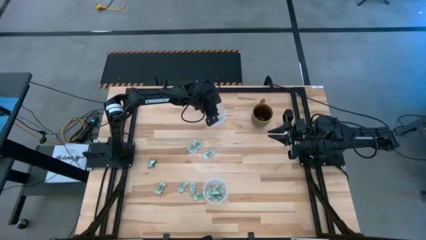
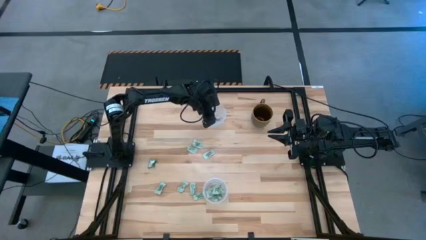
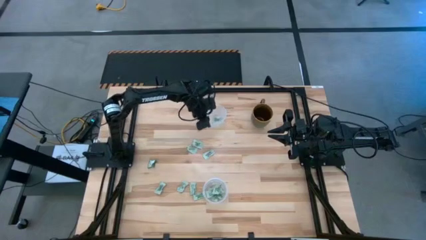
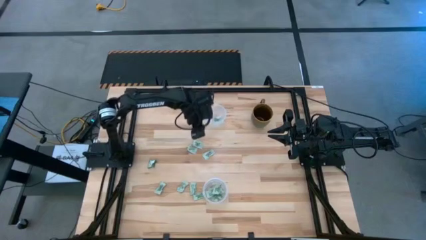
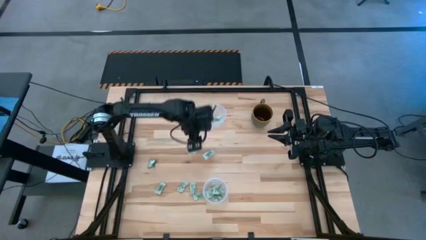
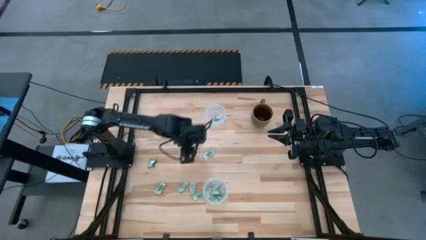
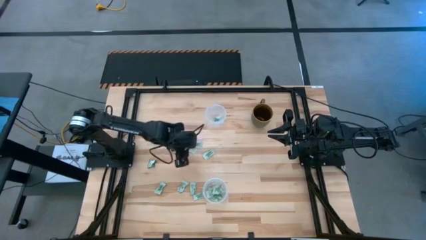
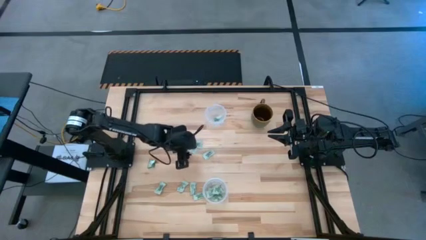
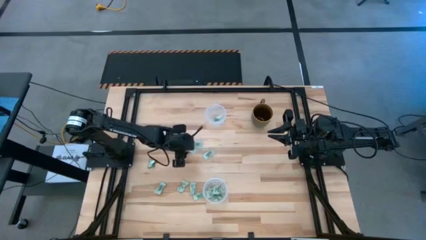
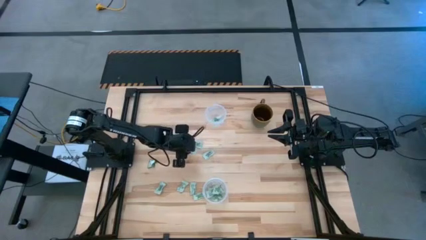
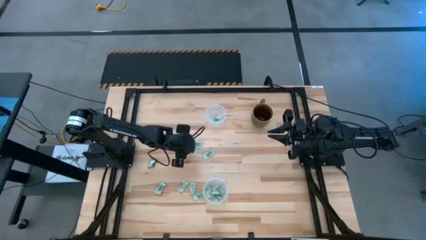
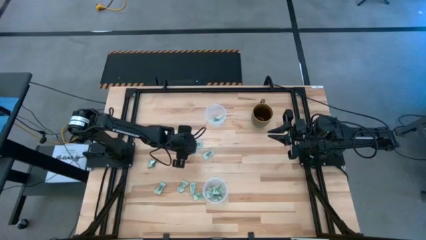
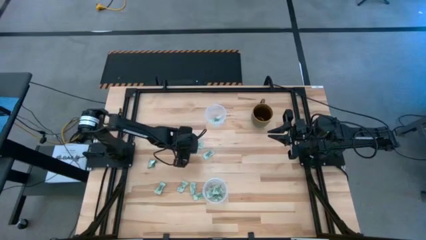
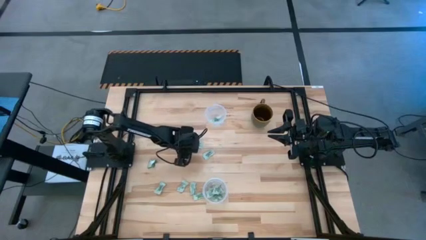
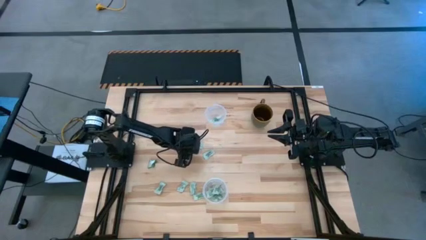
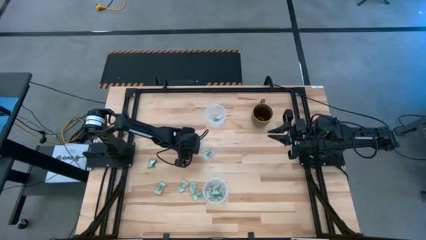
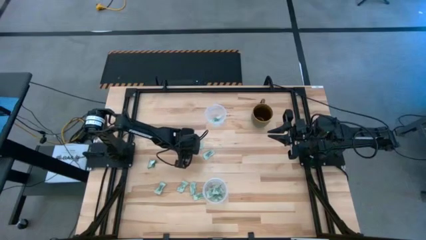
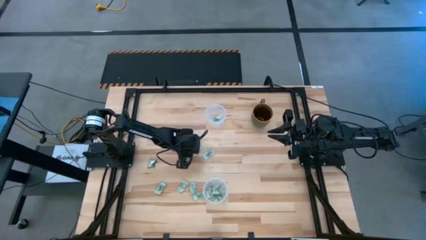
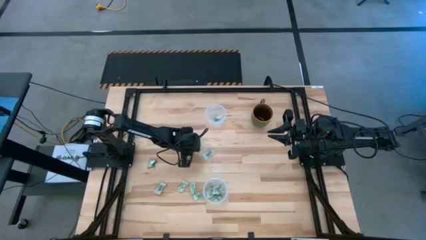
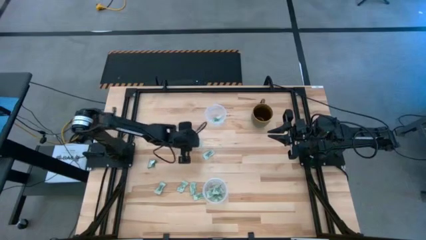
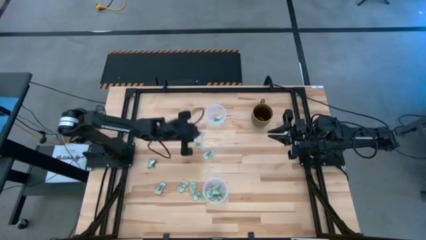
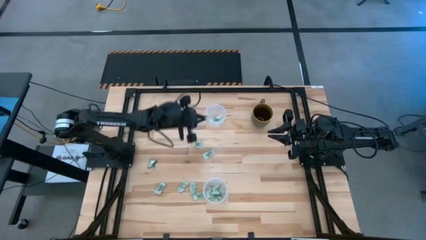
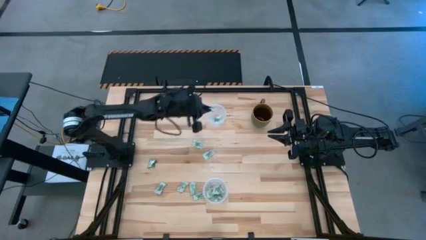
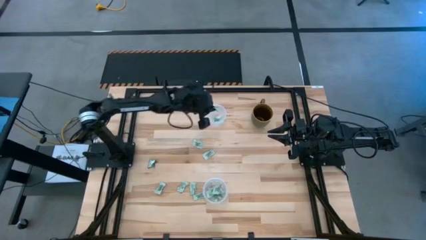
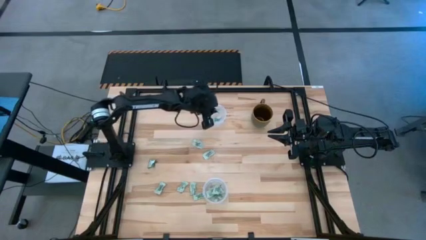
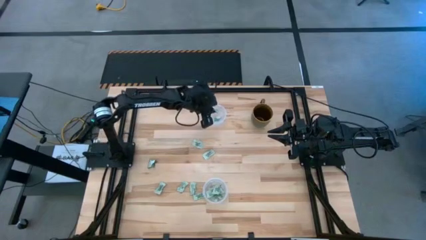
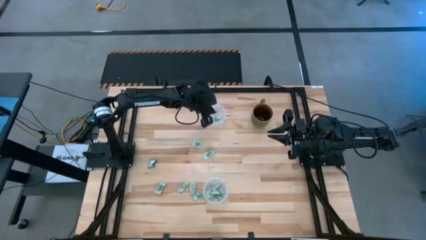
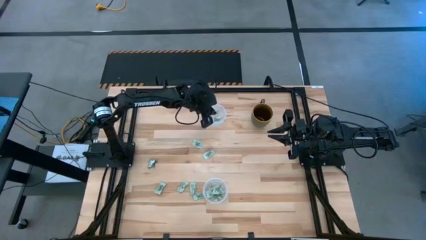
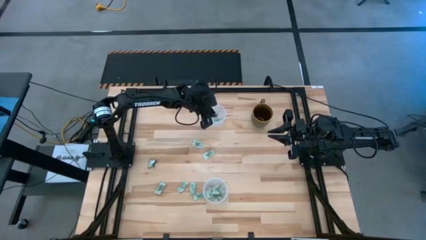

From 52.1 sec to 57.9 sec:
Task: Pick and place Stevia / Truvia into bins
Put the stevia packet into the top transparent container

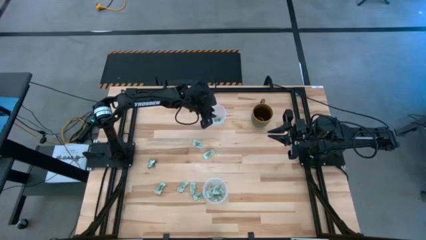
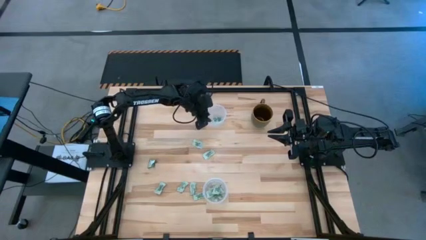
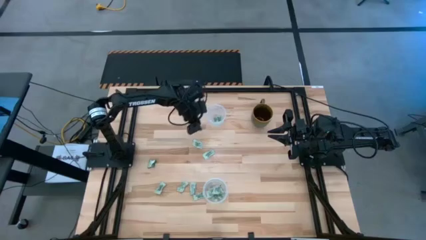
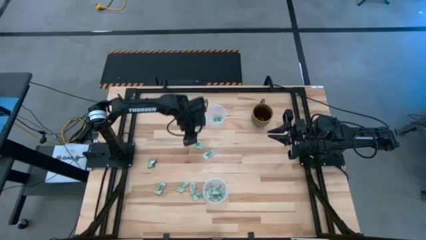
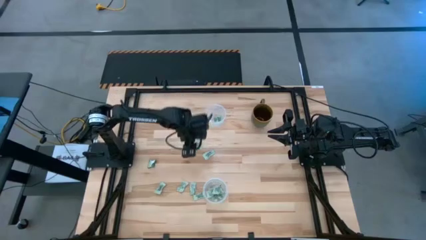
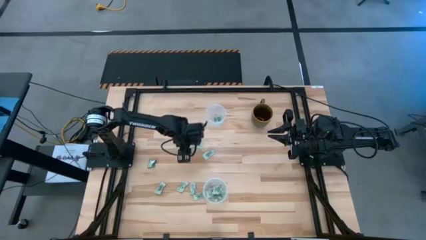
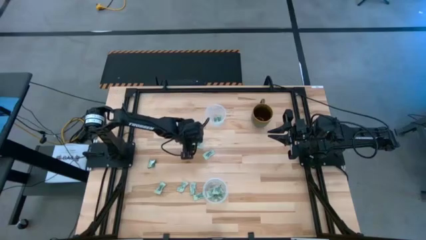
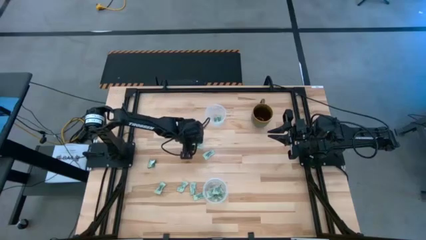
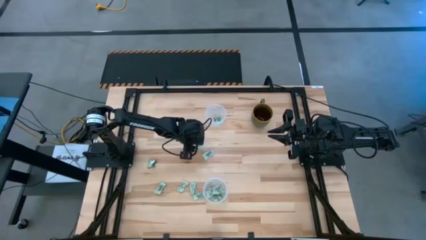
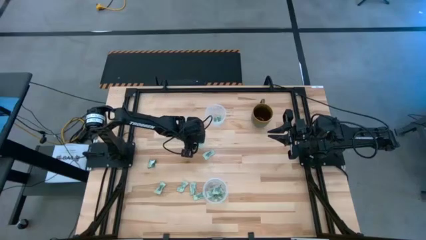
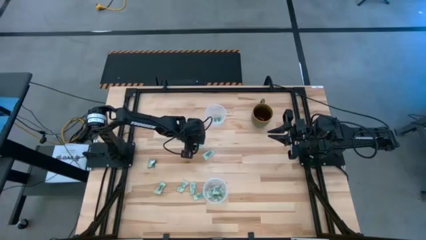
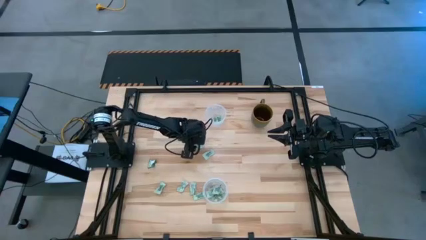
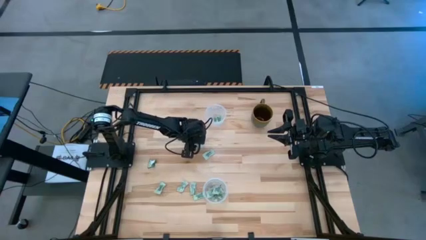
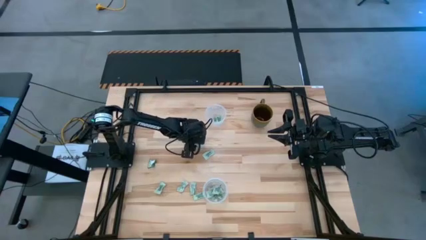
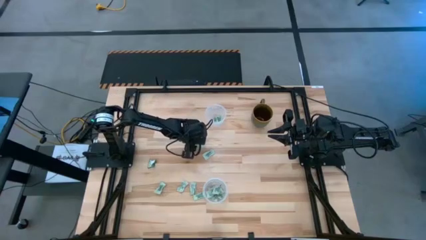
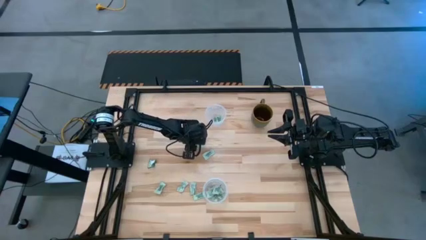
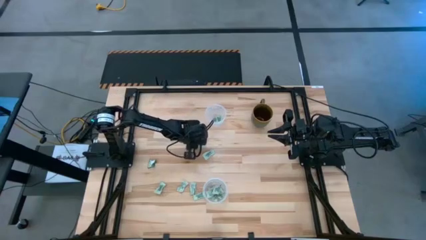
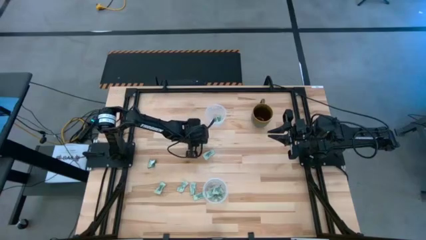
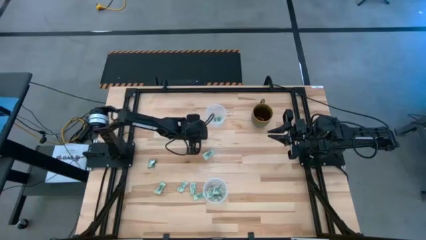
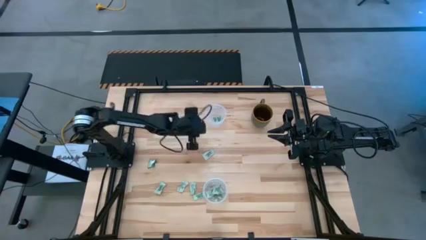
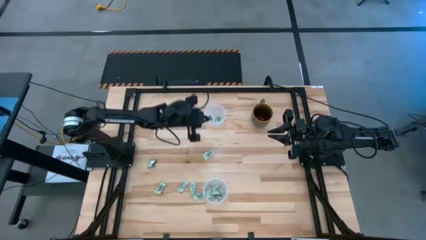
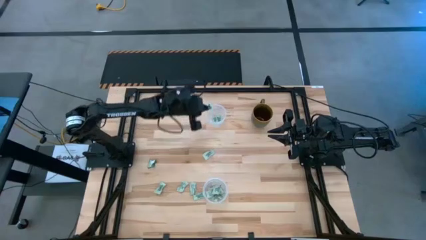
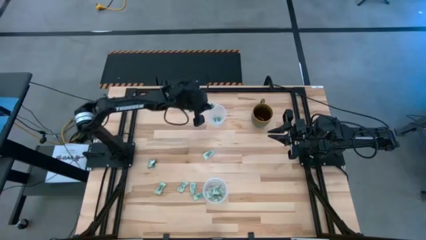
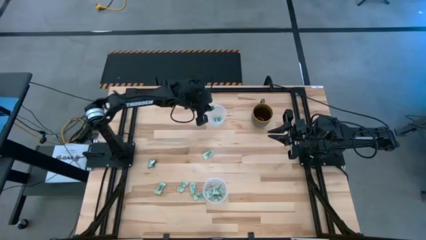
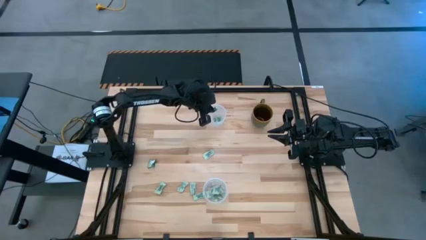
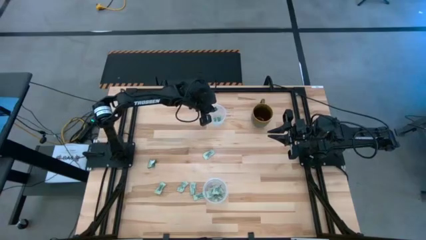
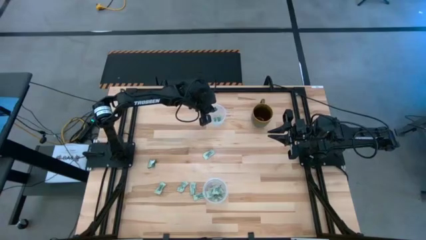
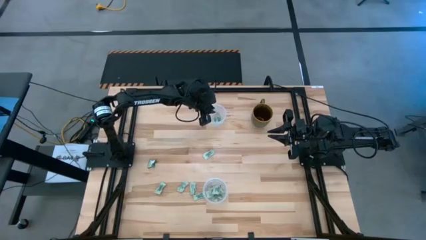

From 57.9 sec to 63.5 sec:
Put the stevia packet into the top transparent container

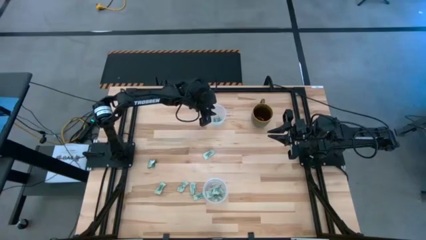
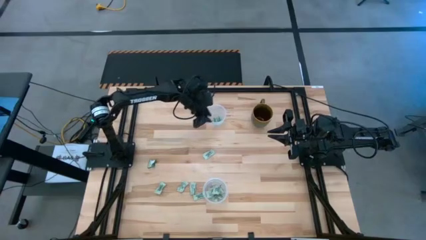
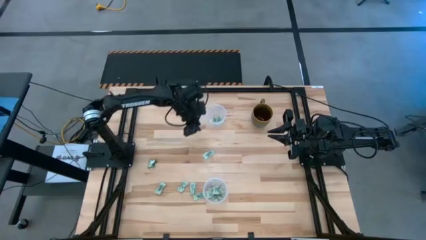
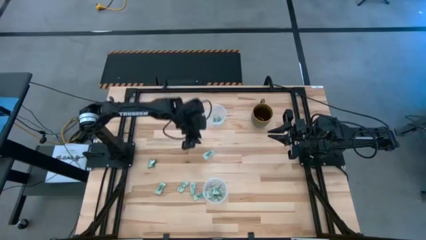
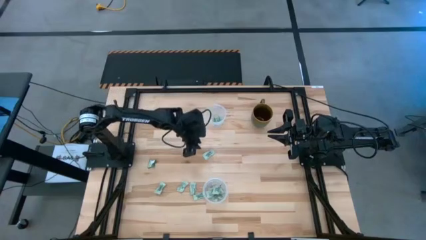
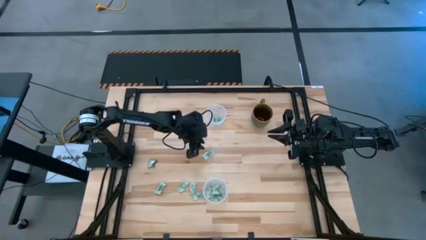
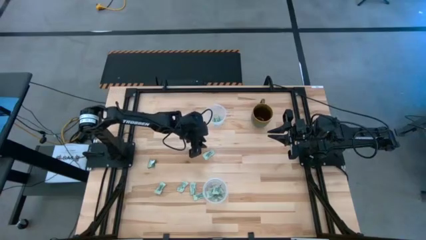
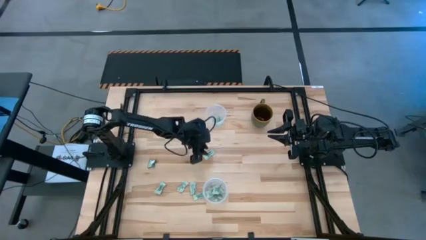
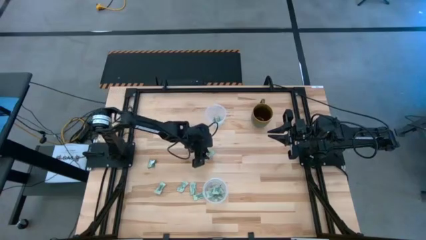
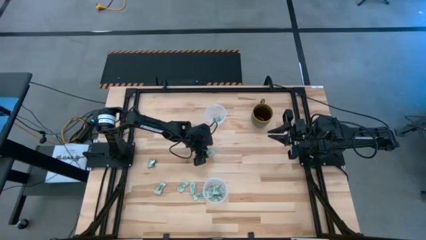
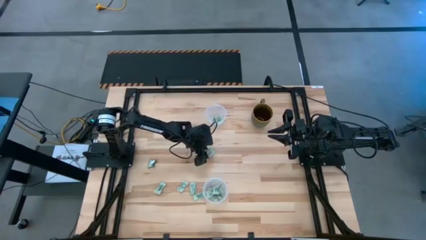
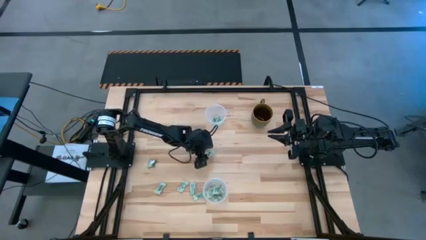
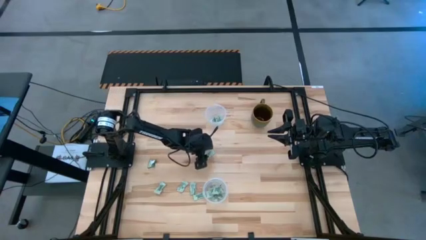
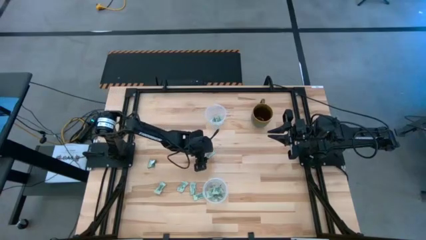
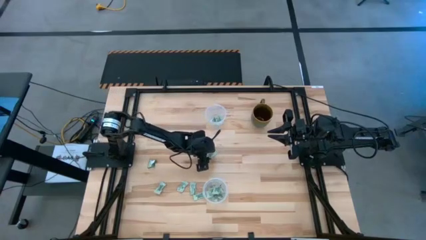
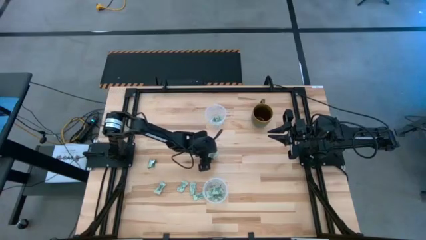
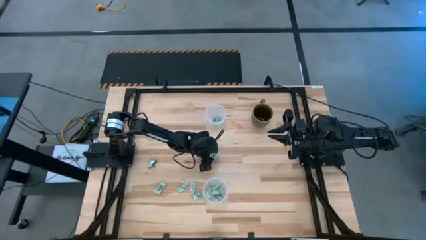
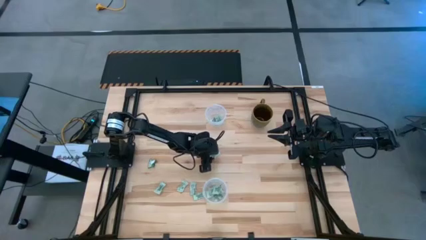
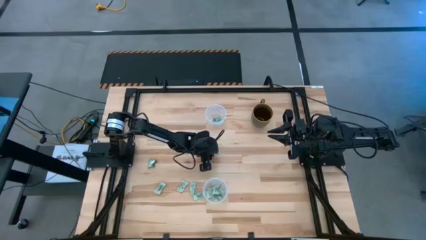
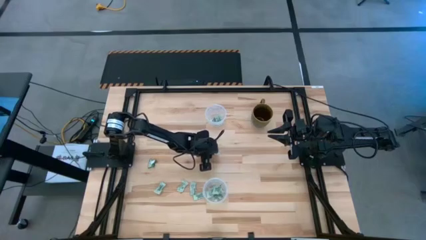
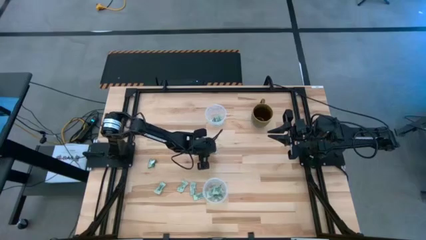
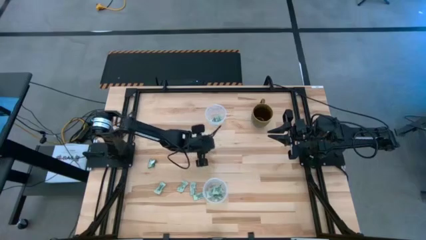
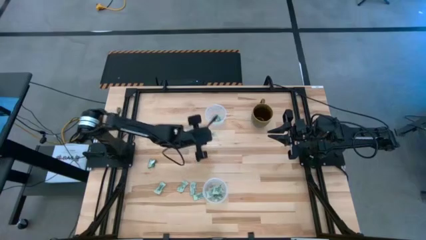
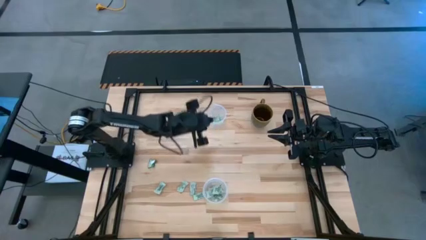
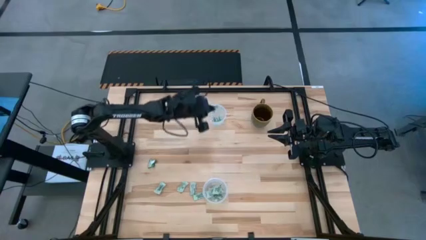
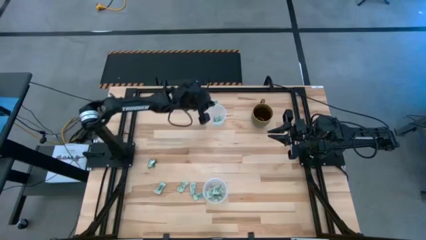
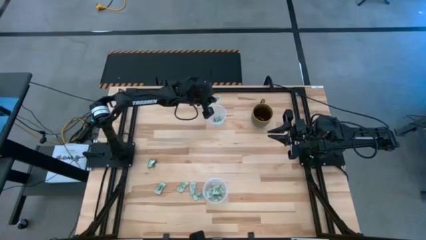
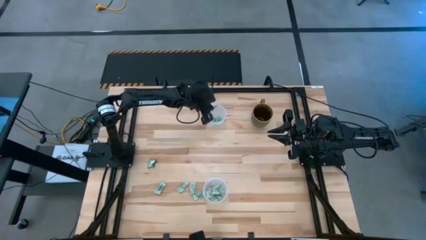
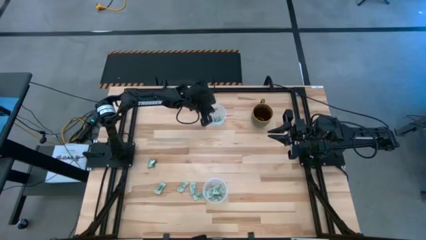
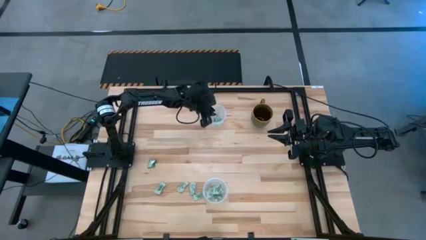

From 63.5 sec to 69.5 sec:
Put the stevia packet into the top transparent container
